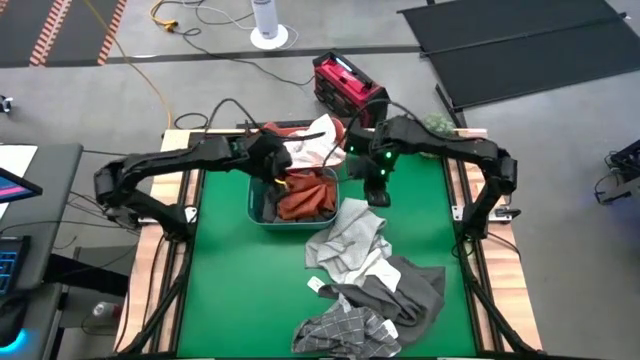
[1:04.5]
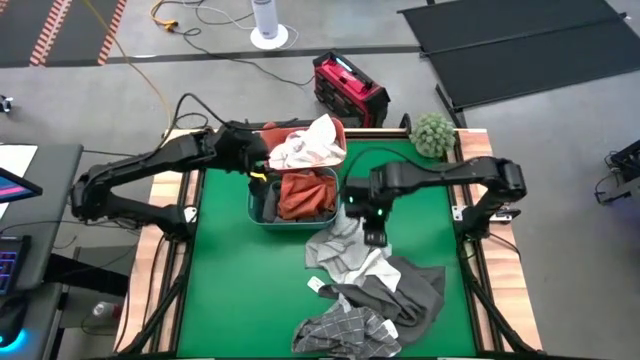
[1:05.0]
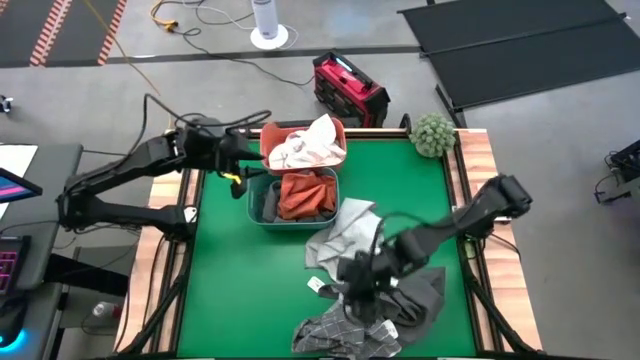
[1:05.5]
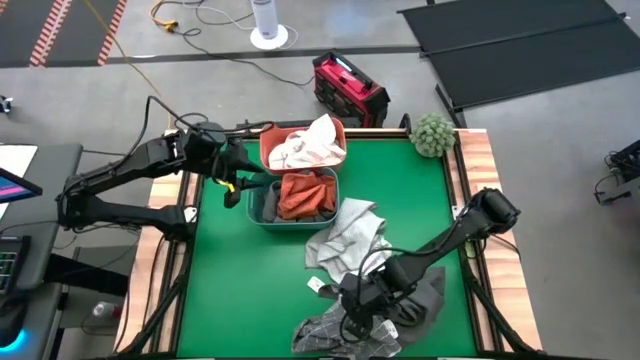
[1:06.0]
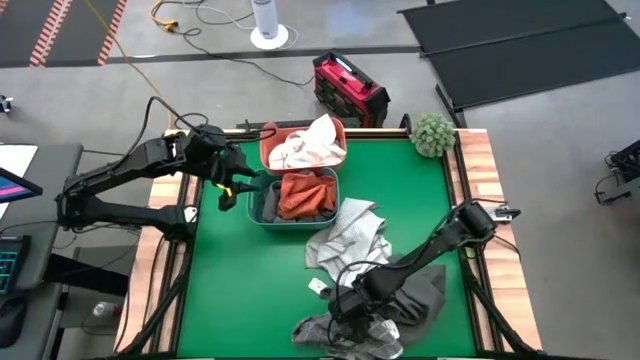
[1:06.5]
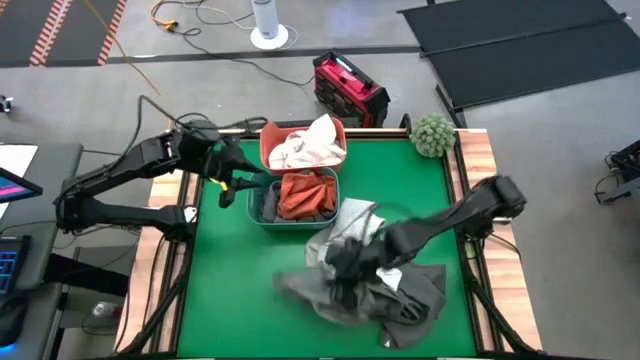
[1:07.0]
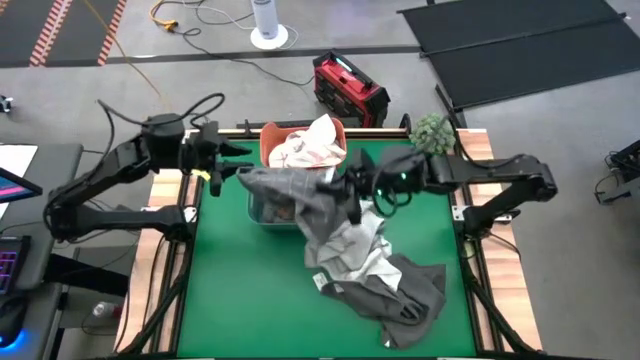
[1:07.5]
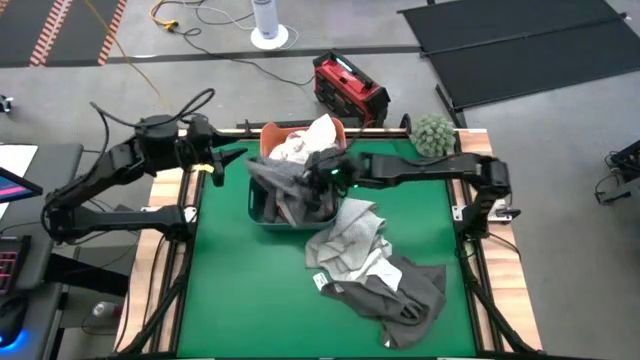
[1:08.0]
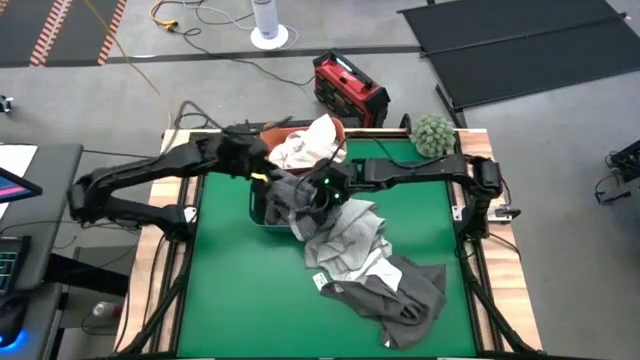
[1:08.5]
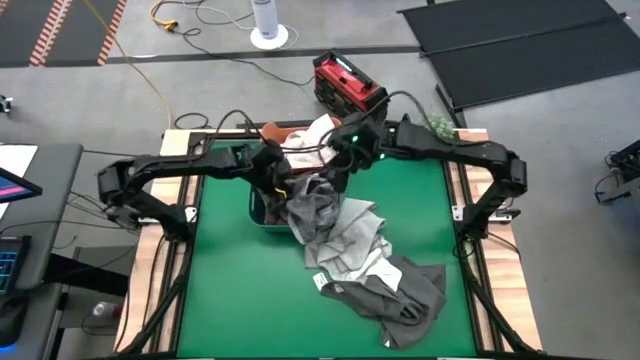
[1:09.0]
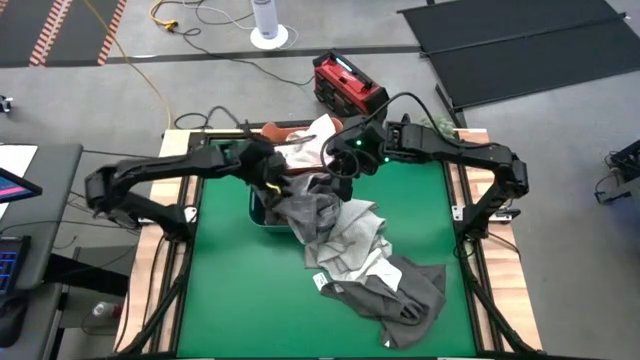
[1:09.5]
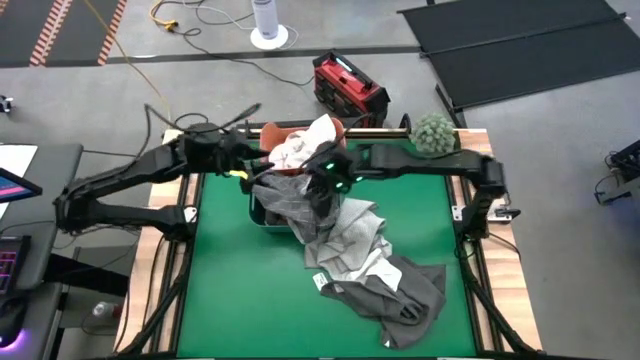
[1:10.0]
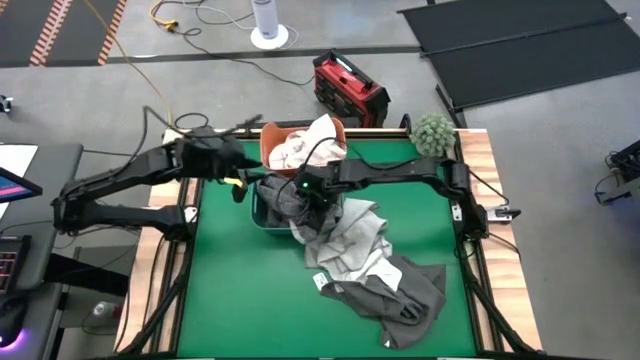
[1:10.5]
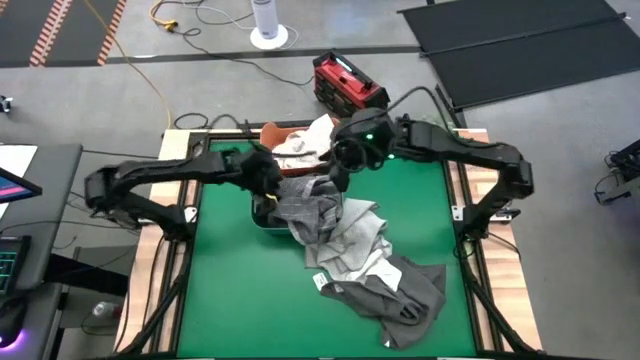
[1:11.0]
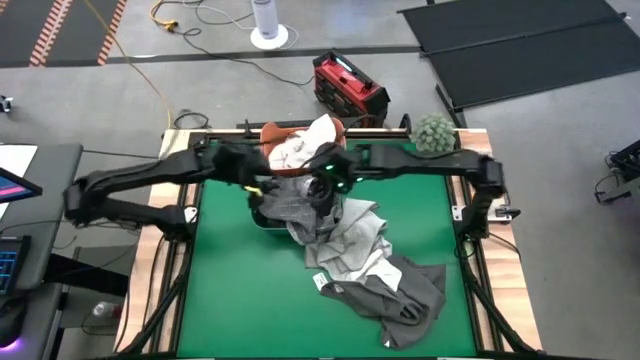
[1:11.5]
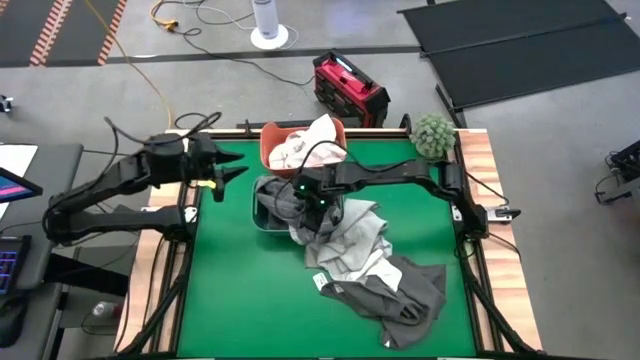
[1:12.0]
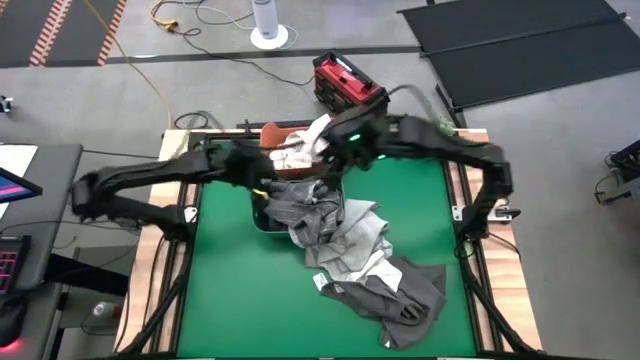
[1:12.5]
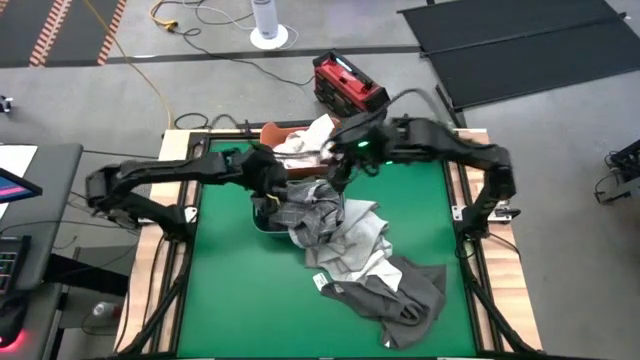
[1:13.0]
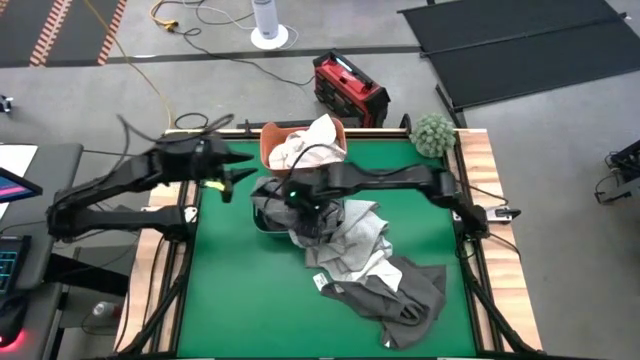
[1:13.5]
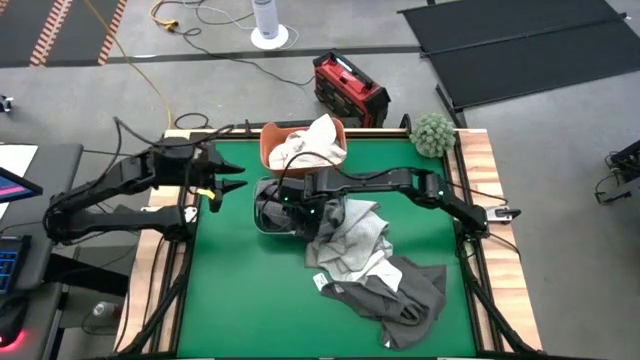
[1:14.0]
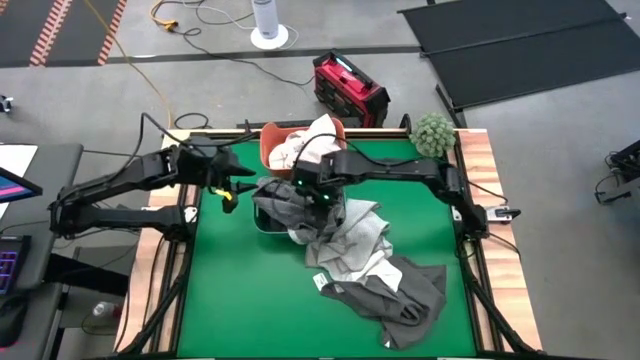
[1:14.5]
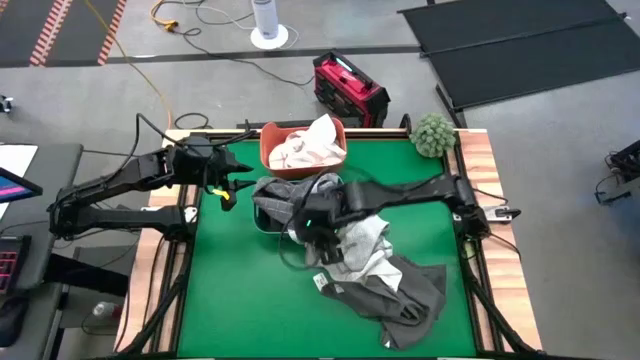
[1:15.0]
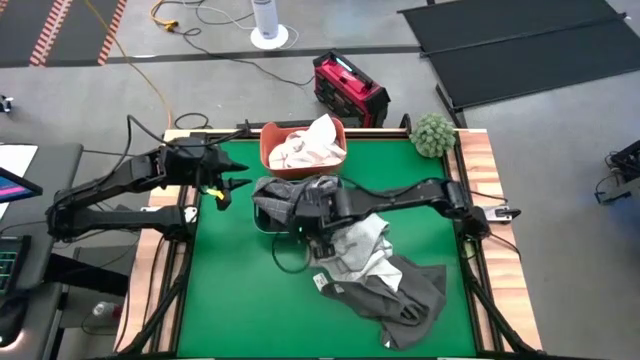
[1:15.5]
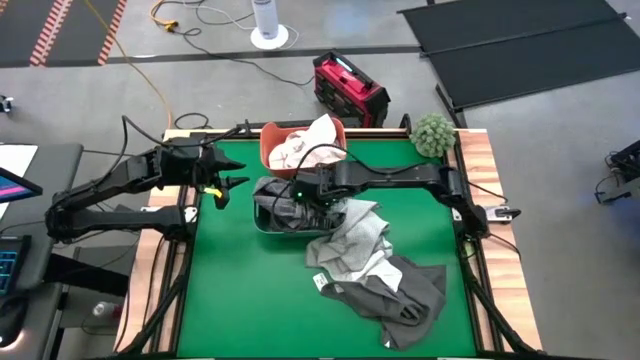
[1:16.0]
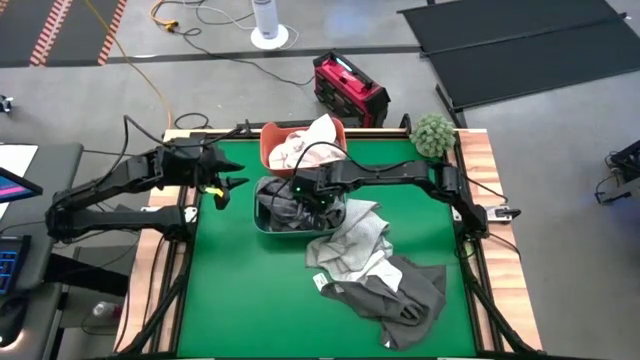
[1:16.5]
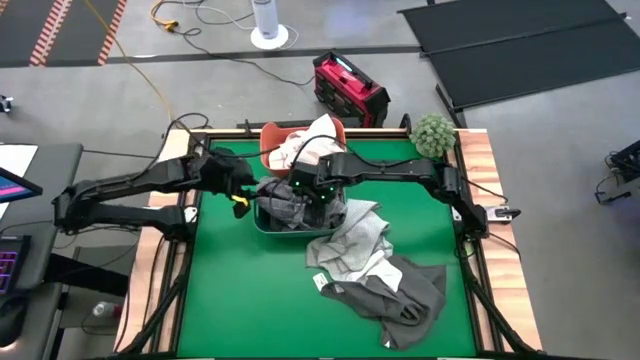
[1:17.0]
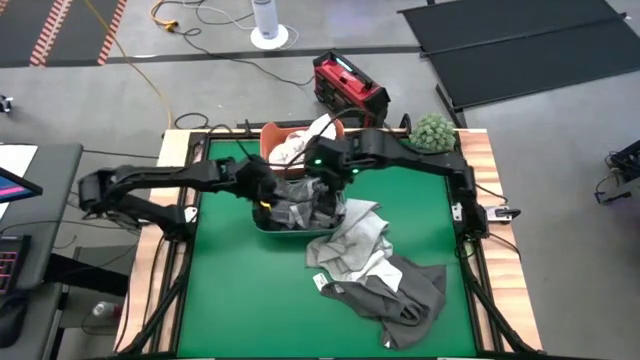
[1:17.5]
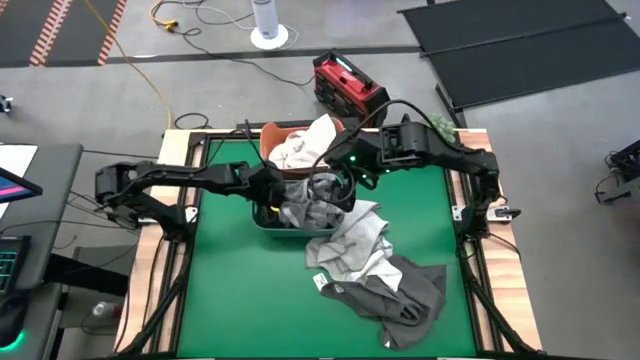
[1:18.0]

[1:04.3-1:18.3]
Task: Sort towels by color in basket
Put the gray pattern towel into the green bin

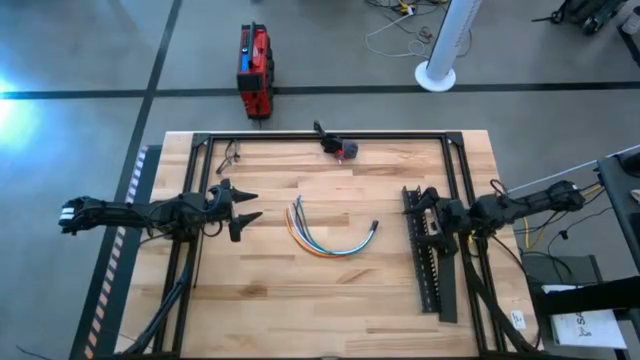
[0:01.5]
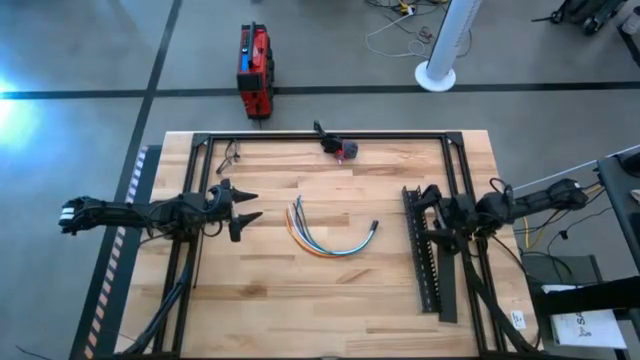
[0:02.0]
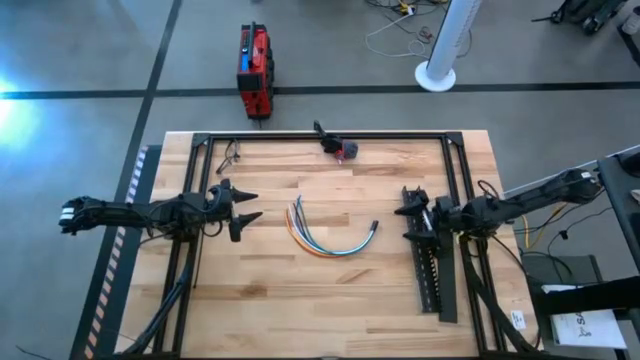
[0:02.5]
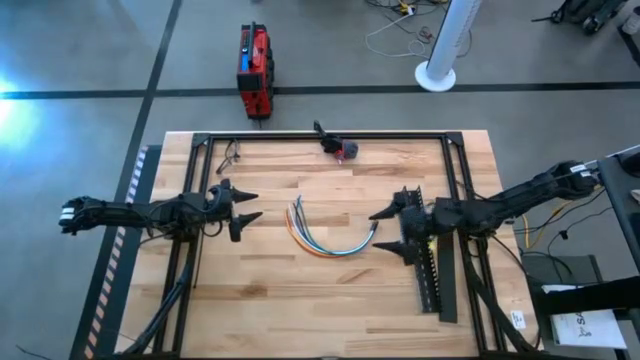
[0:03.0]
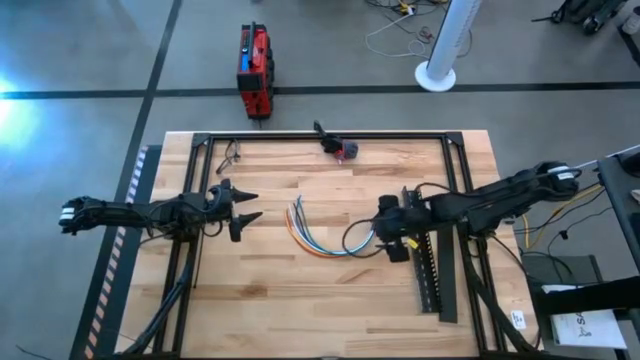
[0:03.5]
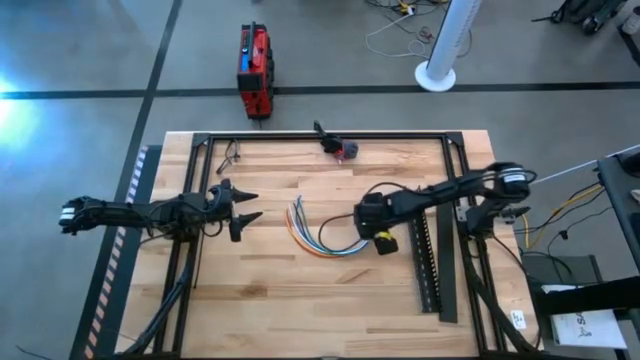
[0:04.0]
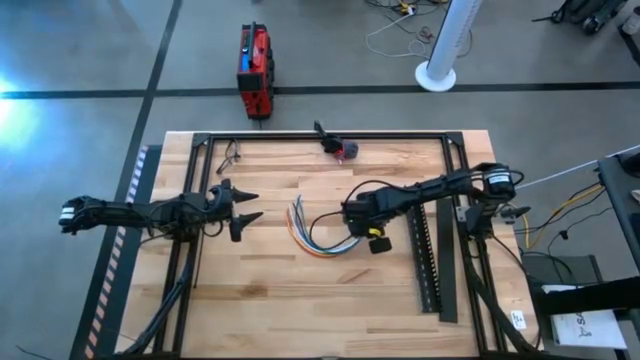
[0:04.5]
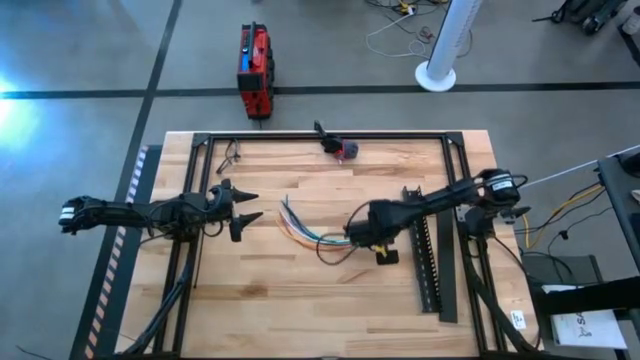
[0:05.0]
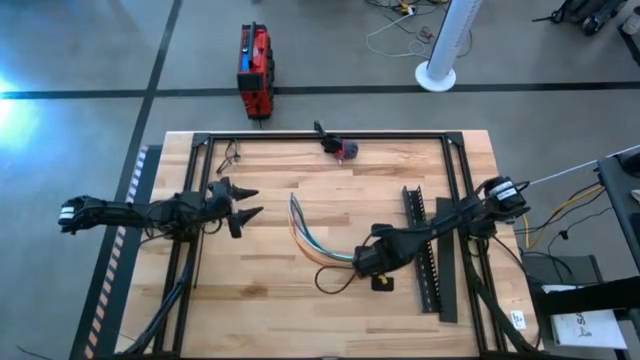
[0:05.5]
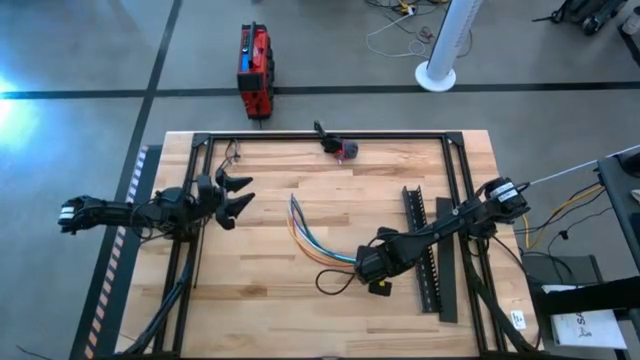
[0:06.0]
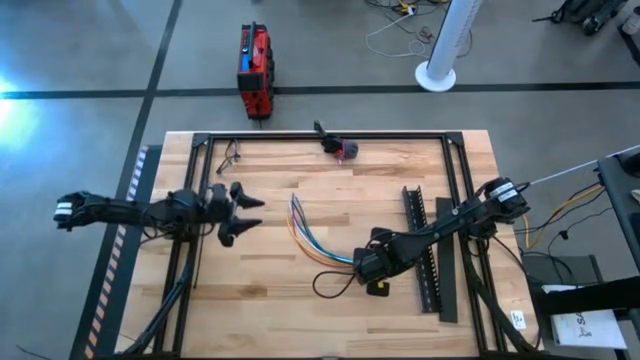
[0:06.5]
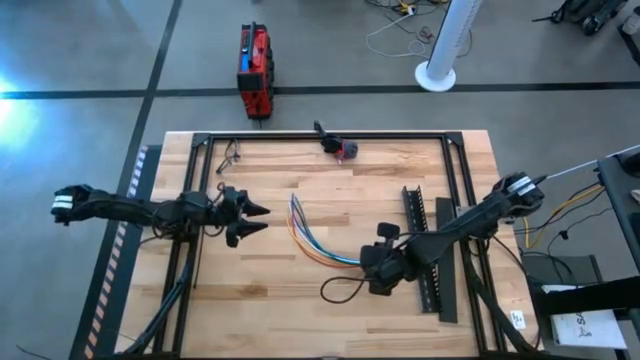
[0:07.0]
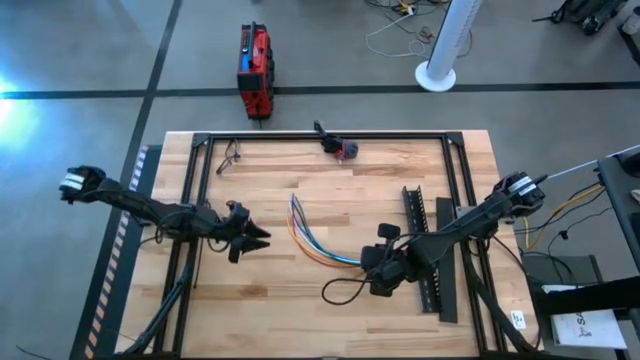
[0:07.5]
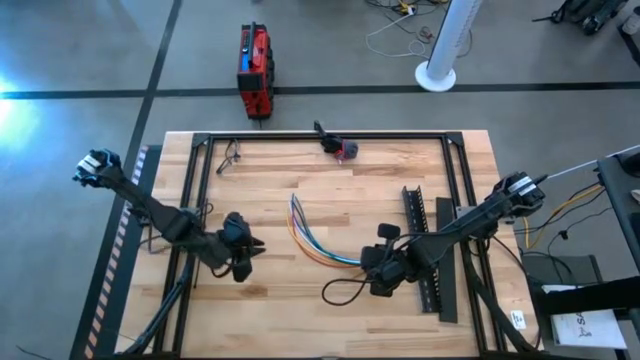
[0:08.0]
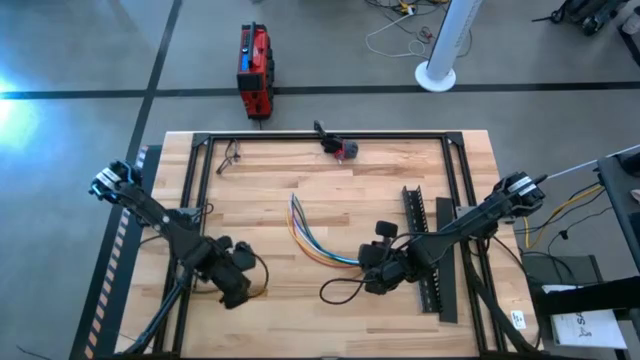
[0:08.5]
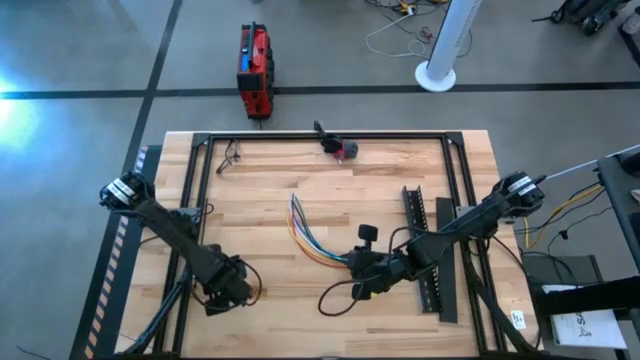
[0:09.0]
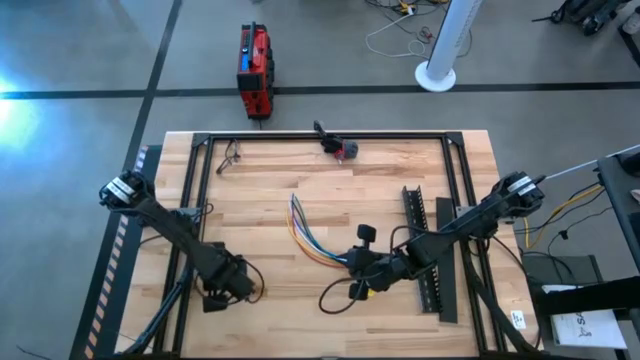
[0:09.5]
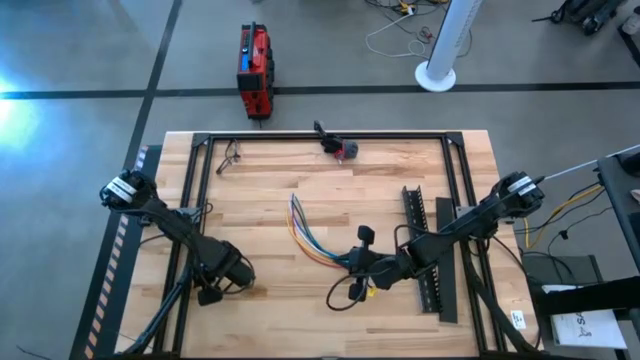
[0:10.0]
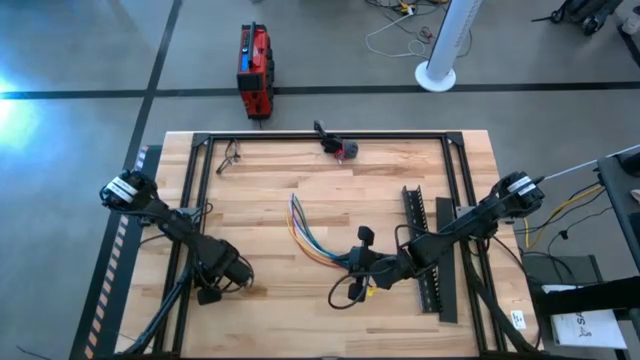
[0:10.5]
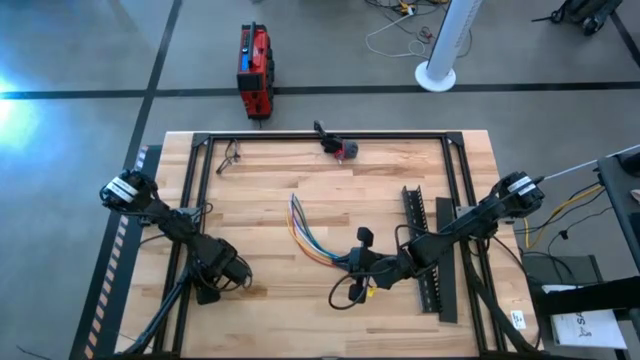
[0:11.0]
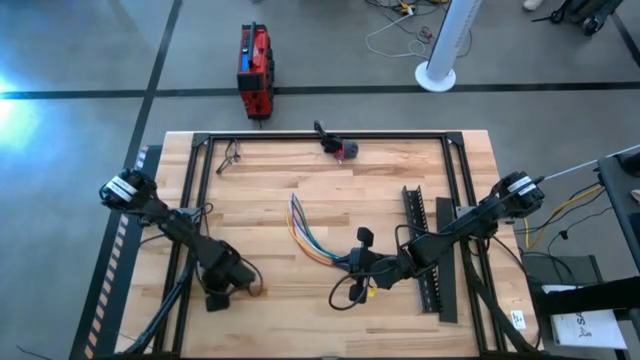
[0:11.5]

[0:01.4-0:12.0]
Task: Ziptie cables
Adjust the cables together with the zip tie
